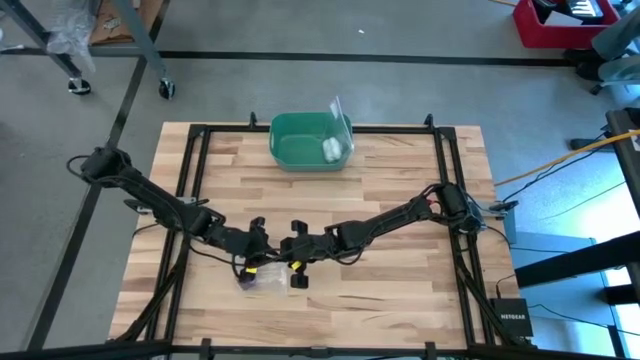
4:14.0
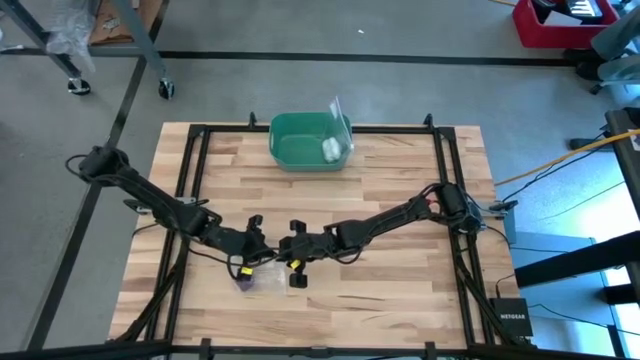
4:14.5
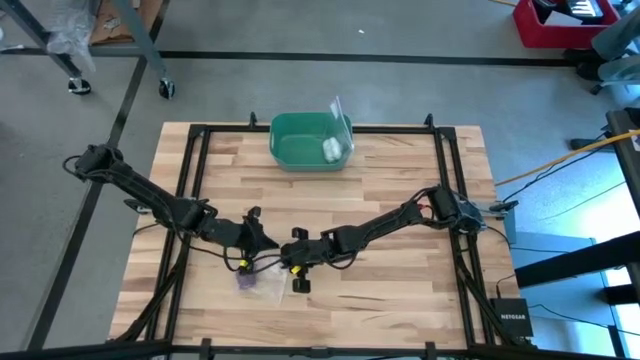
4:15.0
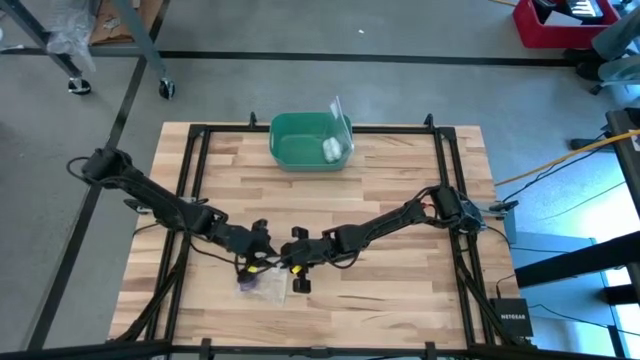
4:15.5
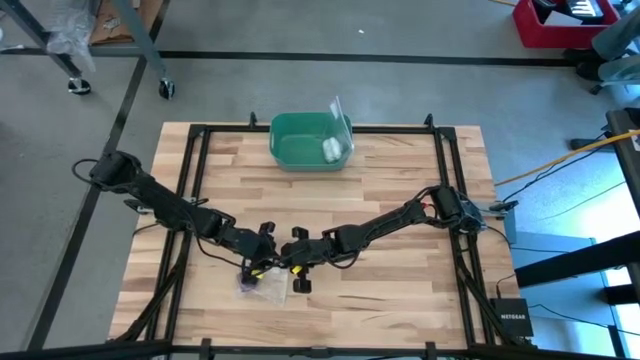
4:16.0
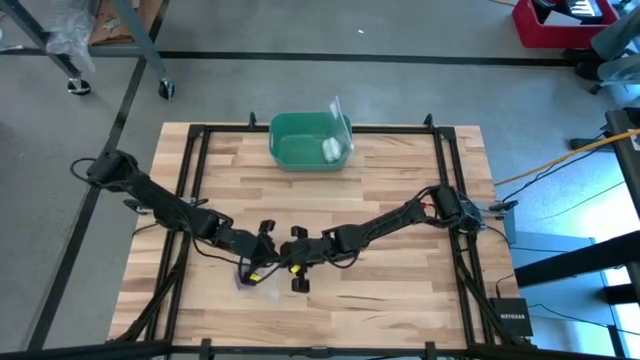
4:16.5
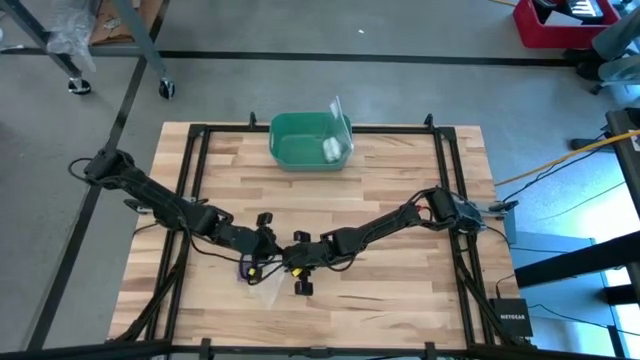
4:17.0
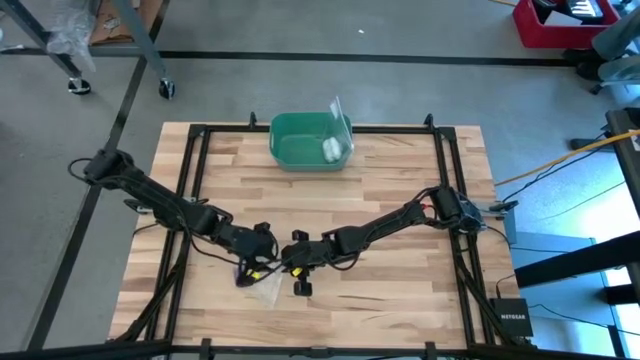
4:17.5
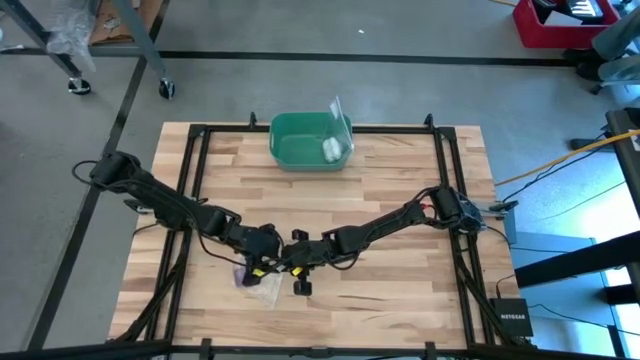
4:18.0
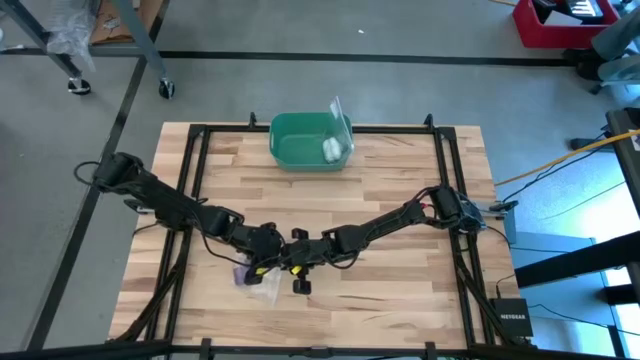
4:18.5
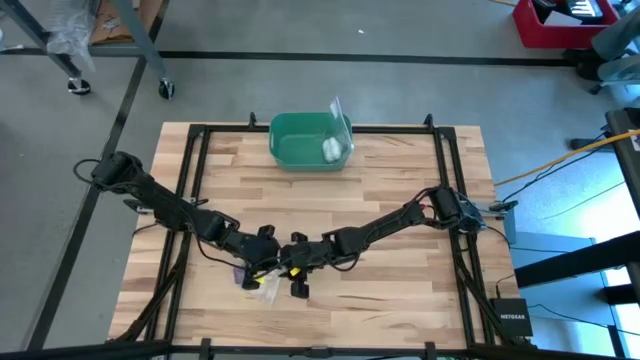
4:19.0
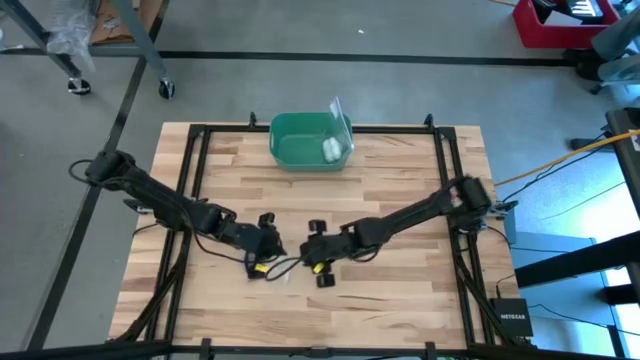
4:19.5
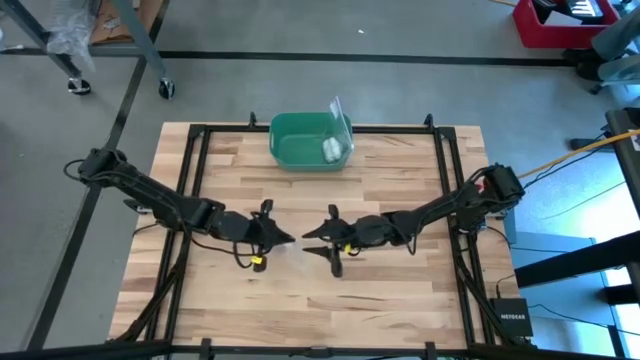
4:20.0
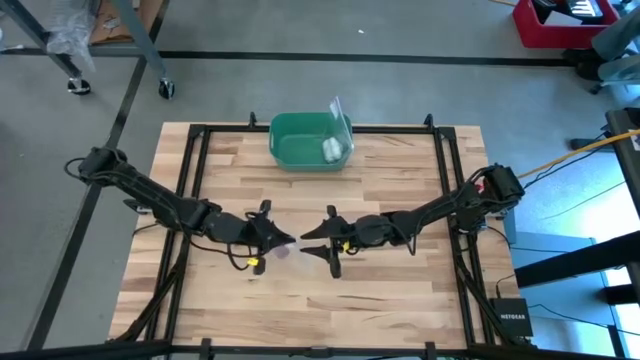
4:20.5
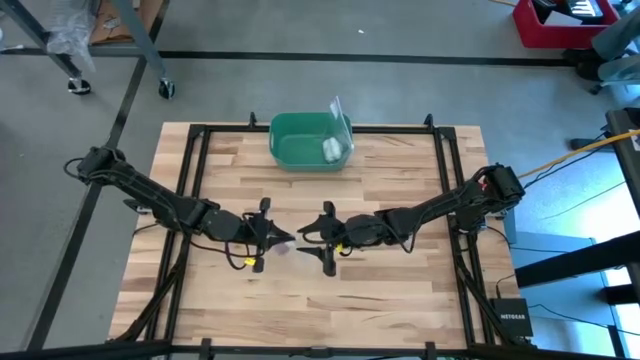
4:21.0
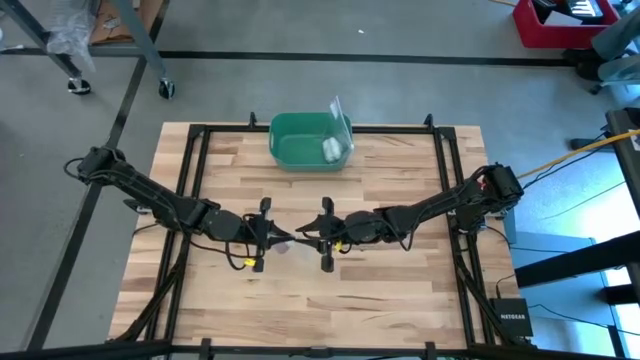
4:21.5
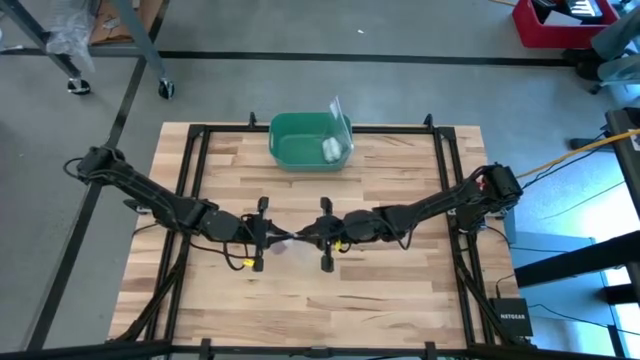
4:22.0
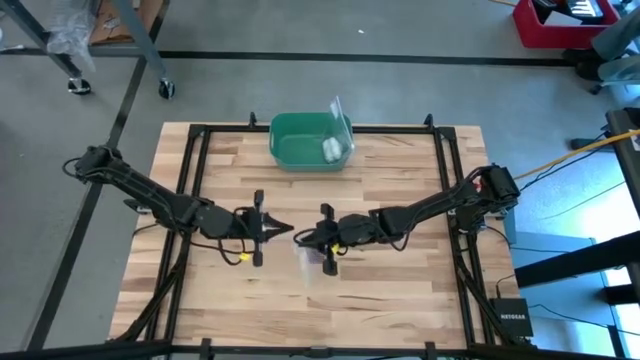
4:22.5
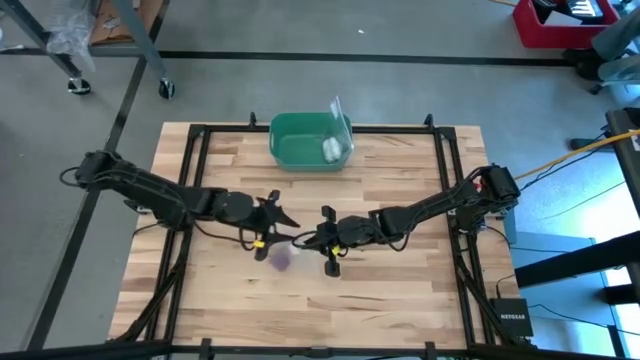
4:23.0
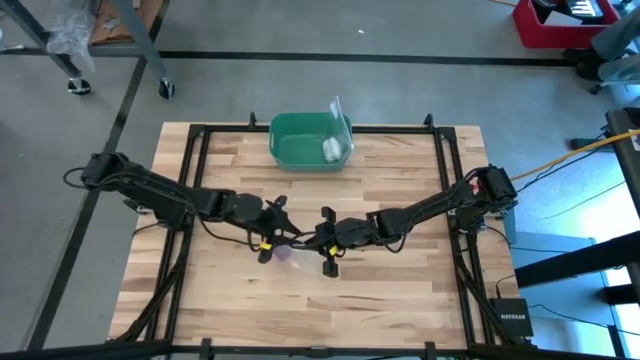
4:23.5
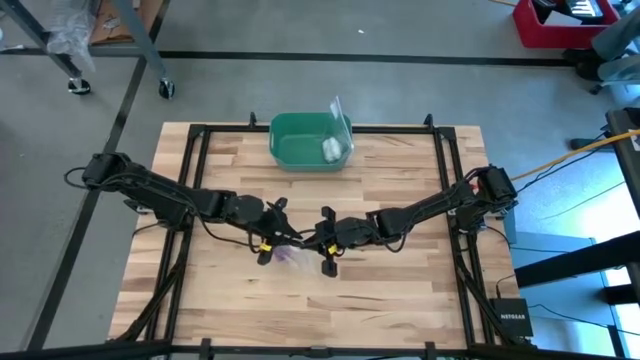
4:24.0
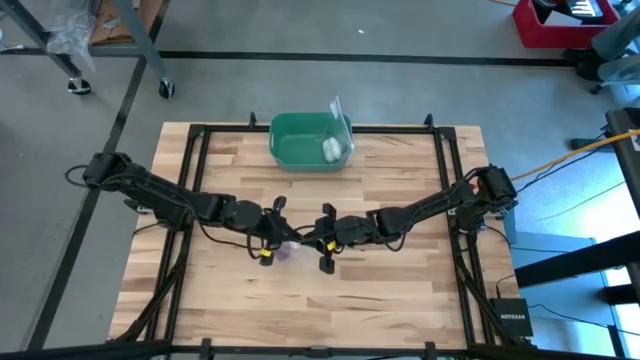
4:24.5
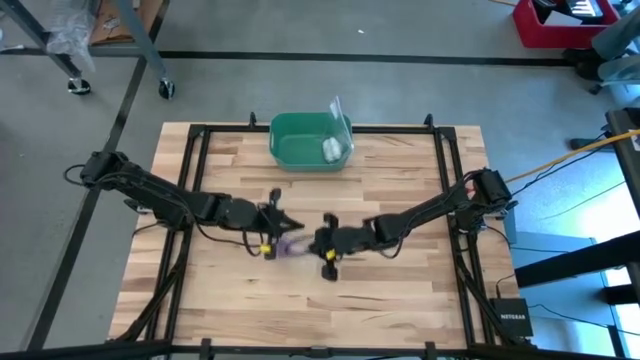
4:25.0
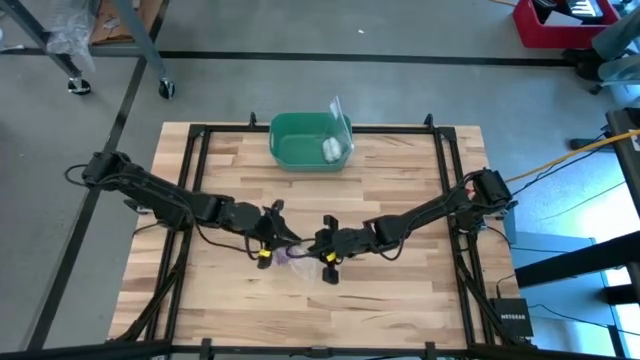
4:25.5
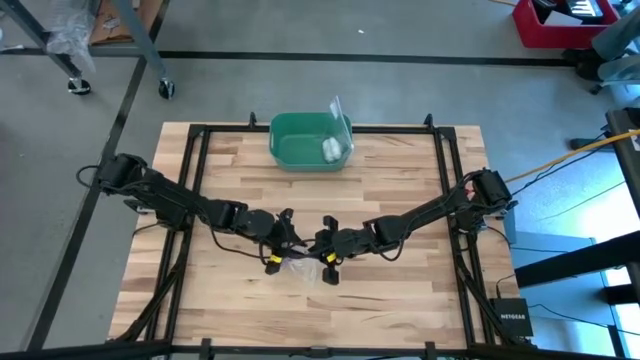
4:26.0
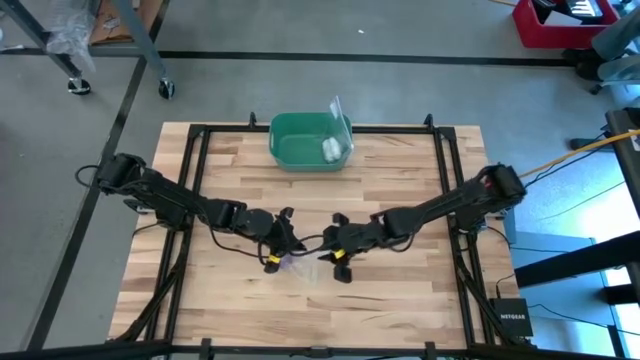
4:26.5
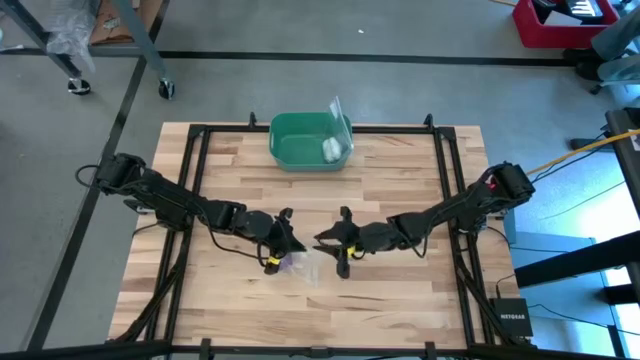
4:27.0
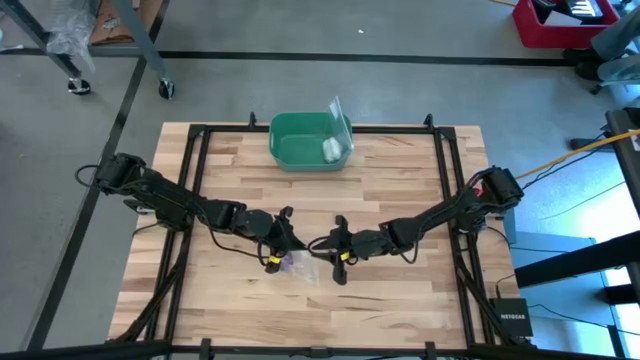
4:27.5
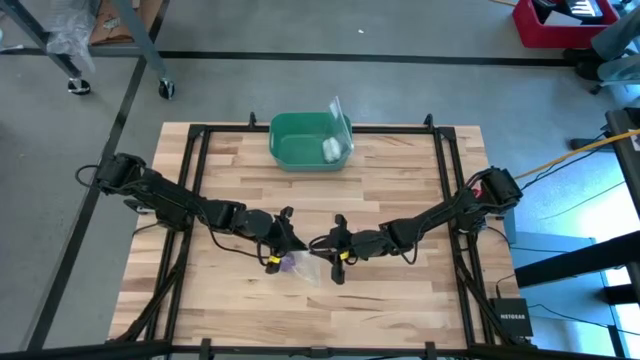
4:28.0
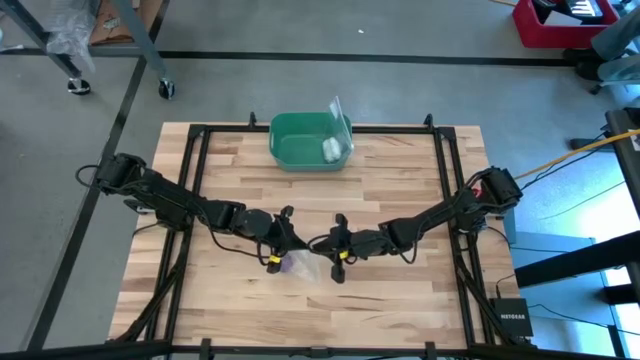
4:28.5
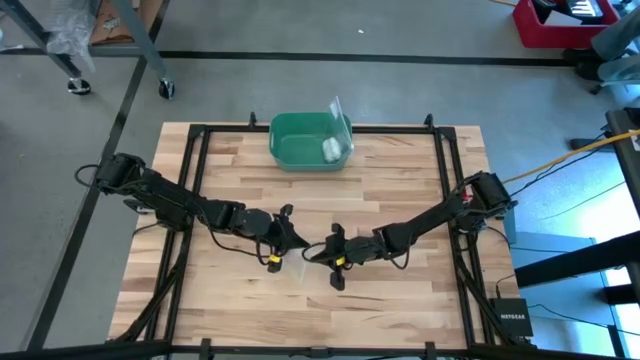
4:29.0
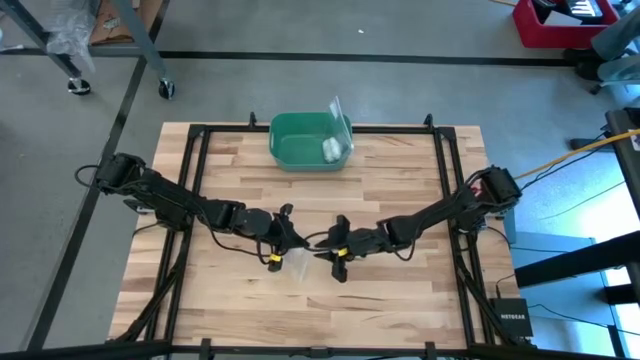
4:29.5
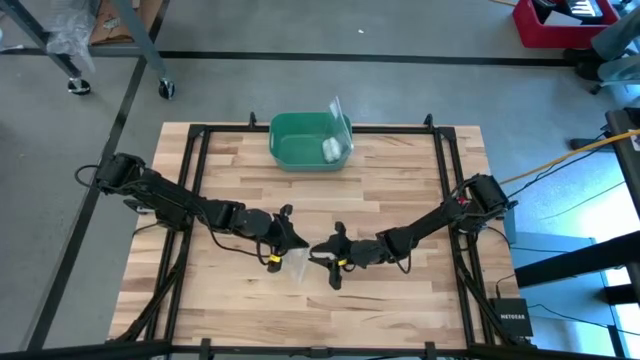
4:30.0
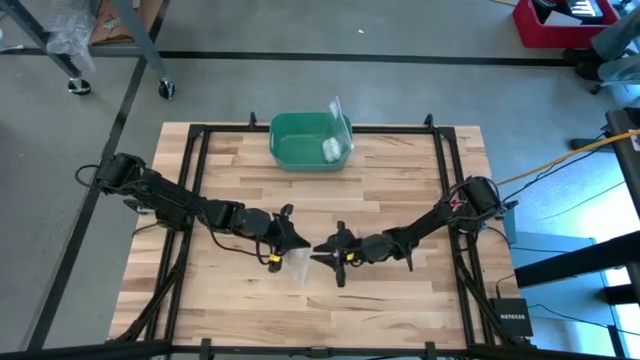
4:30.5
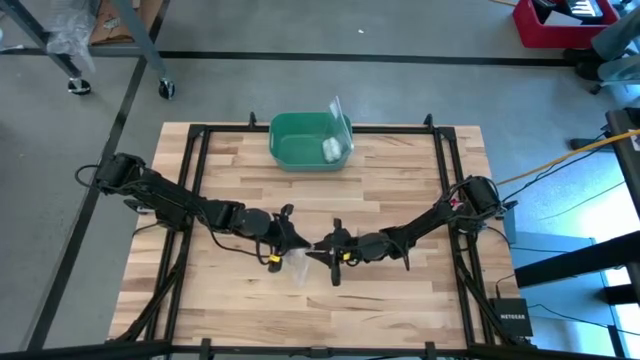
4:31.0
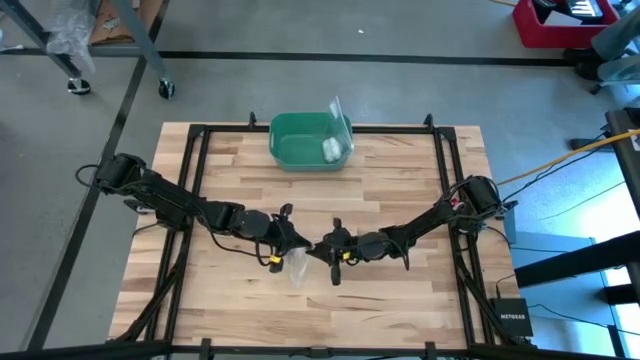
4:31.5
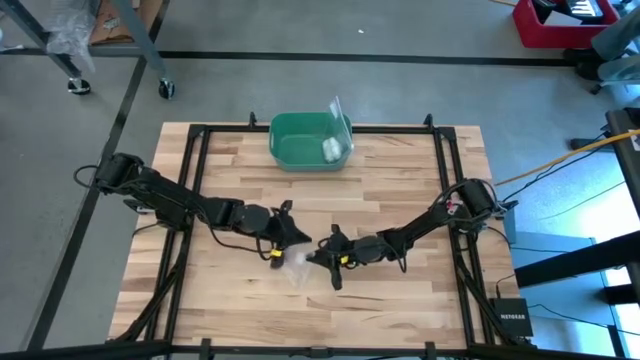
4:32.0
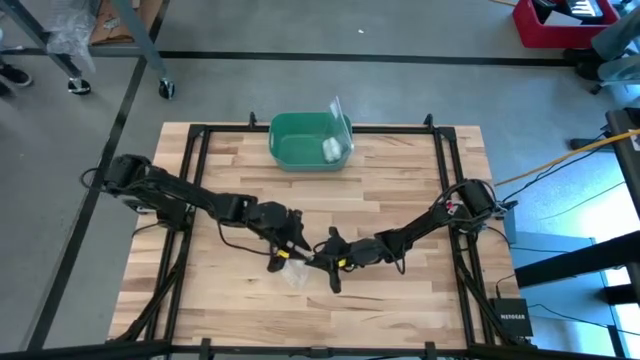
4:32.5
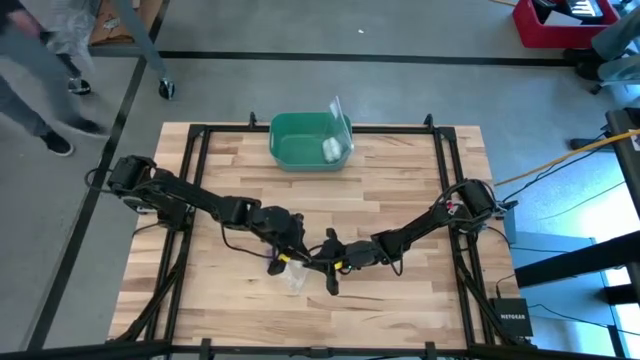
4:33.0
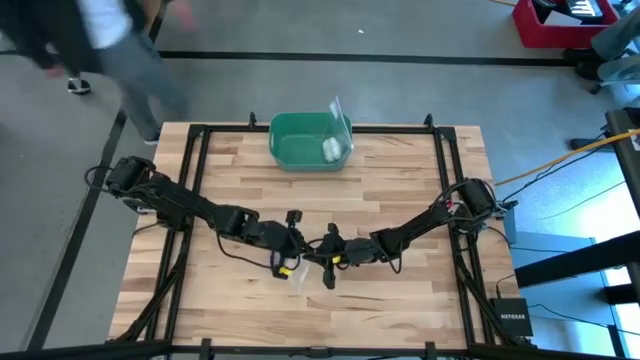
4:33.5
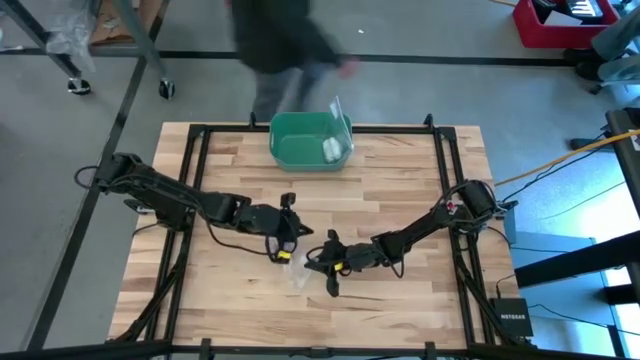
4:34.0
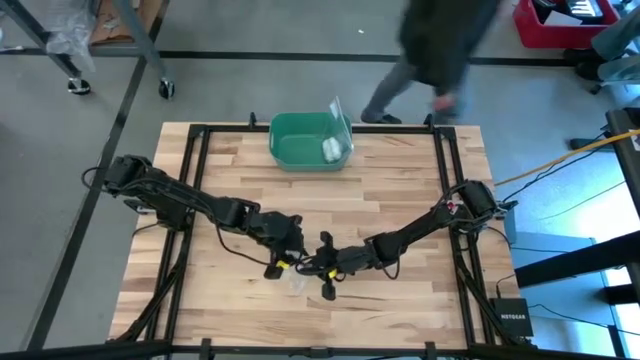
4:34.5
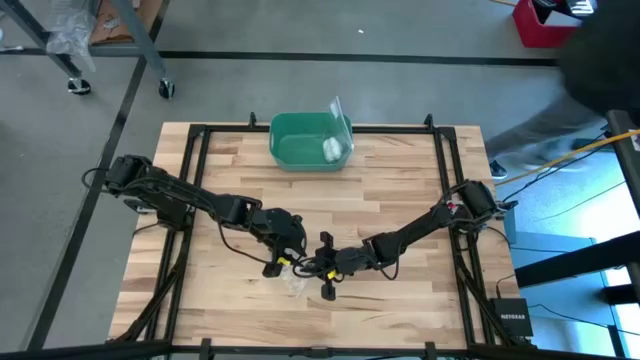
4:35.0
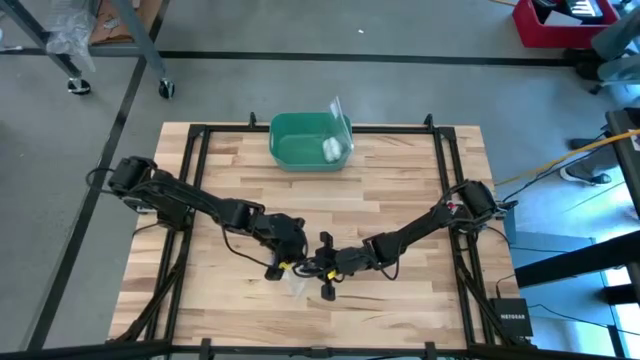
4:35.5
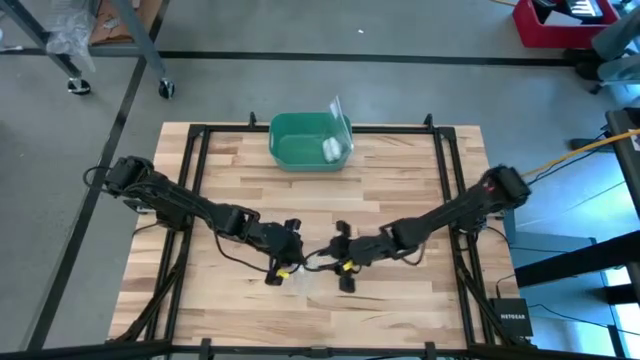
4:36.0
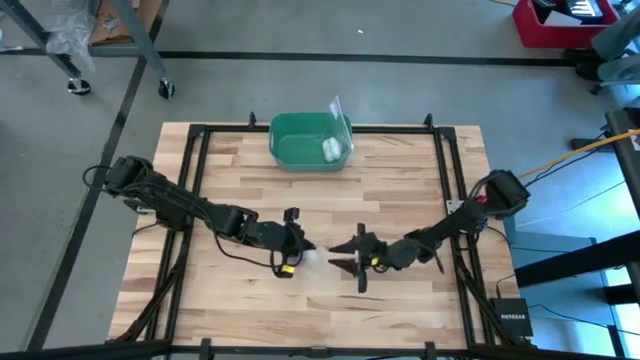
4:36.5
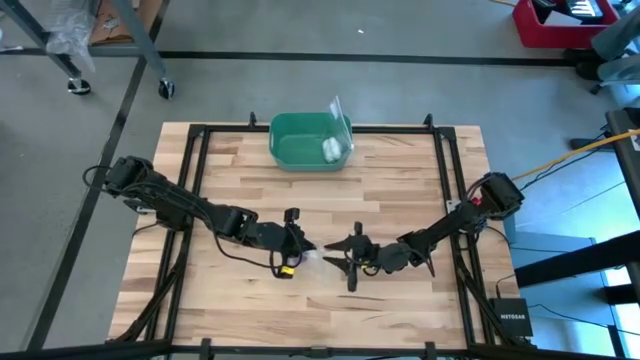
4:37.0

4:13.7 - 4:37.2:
Task: Roll bandage
Close the zip bag
